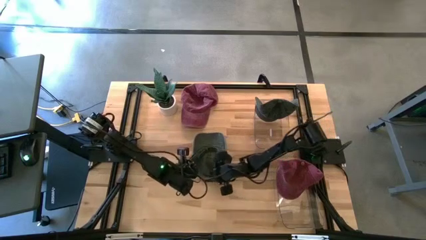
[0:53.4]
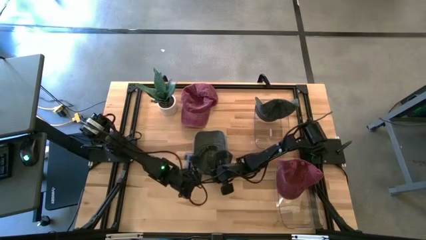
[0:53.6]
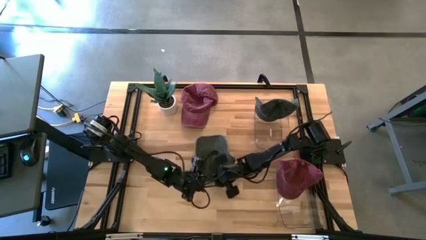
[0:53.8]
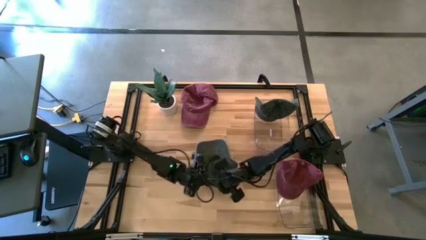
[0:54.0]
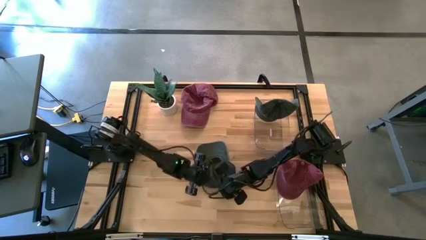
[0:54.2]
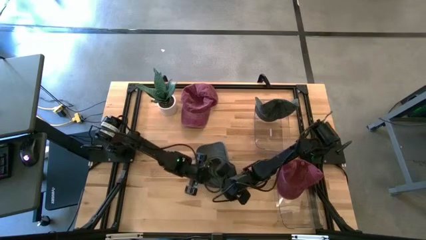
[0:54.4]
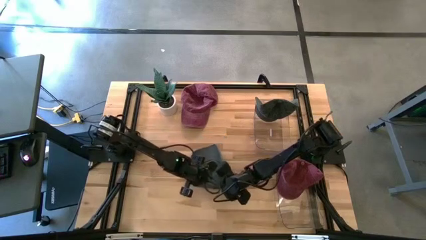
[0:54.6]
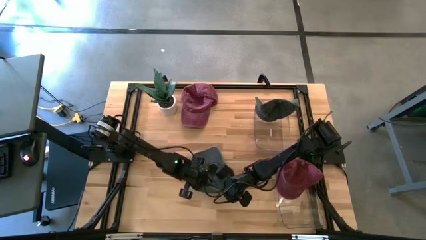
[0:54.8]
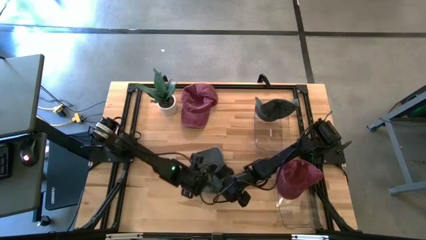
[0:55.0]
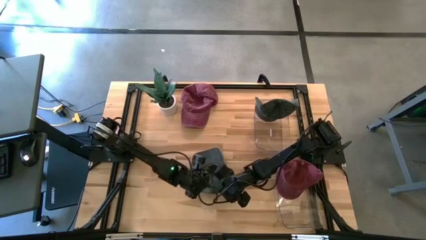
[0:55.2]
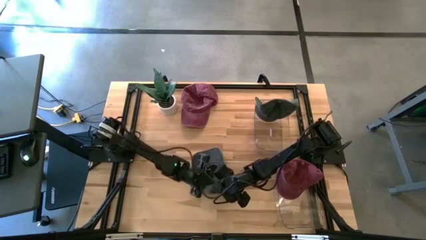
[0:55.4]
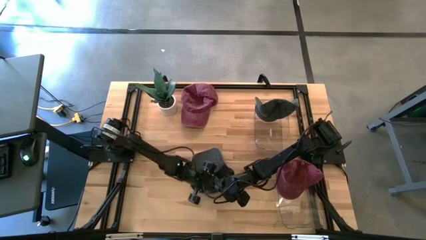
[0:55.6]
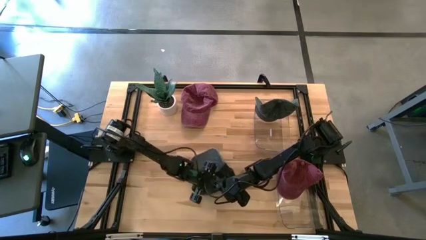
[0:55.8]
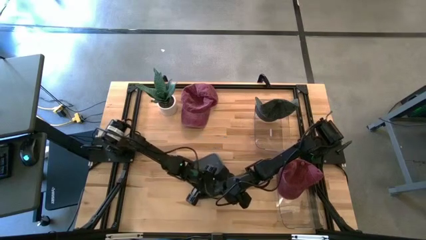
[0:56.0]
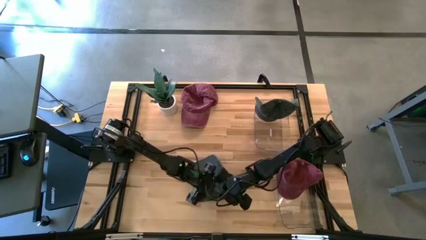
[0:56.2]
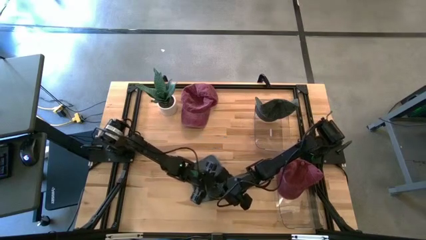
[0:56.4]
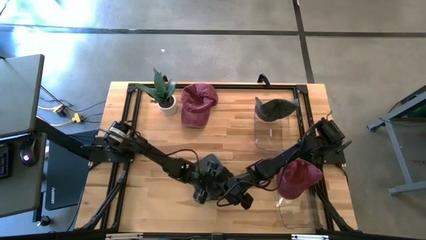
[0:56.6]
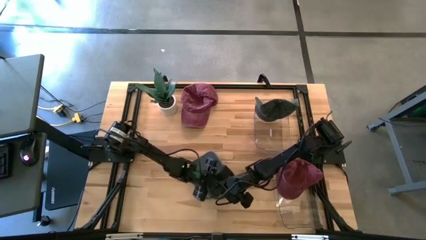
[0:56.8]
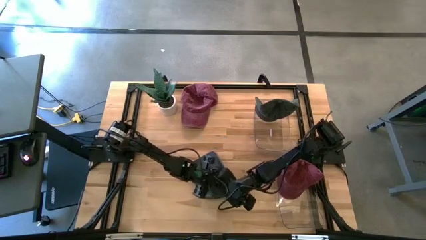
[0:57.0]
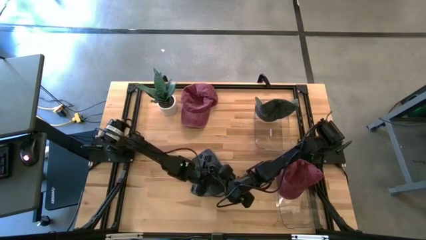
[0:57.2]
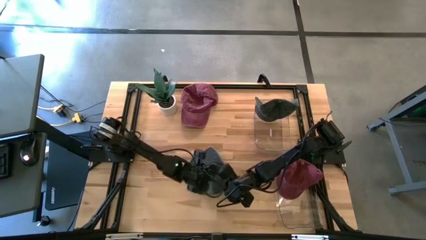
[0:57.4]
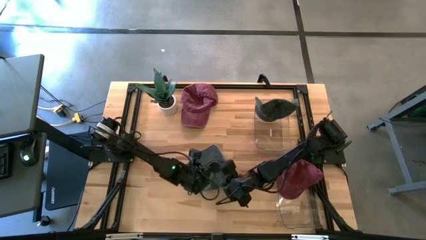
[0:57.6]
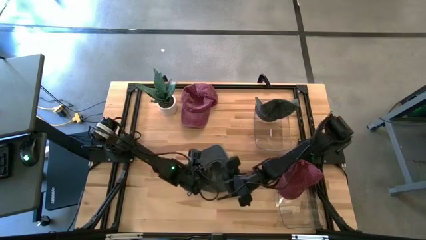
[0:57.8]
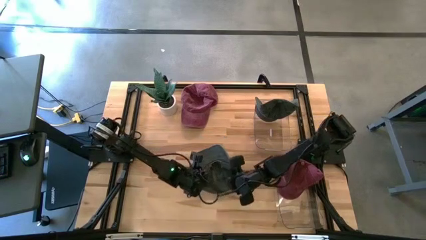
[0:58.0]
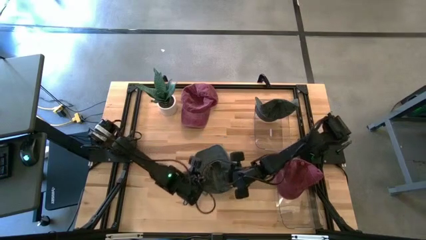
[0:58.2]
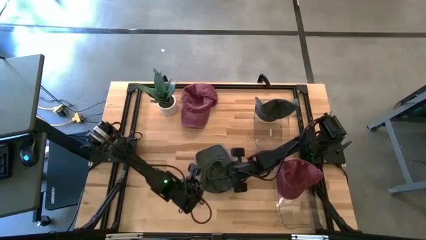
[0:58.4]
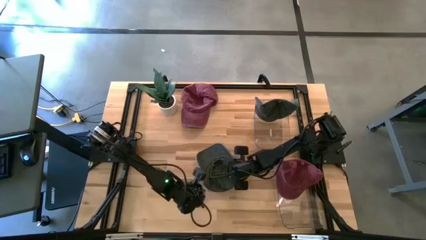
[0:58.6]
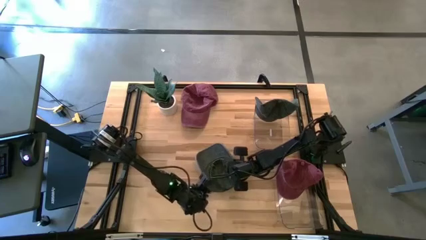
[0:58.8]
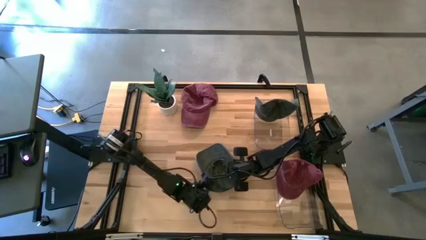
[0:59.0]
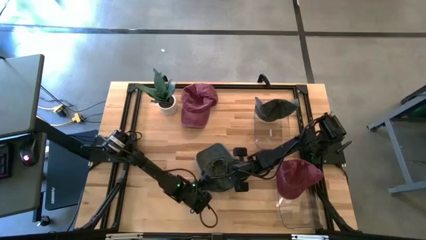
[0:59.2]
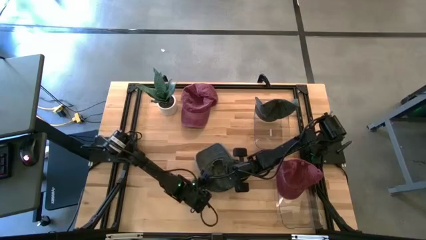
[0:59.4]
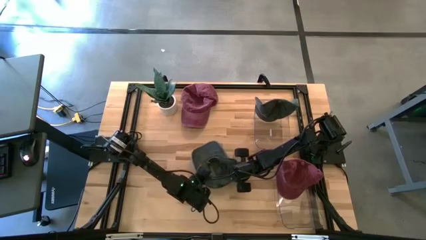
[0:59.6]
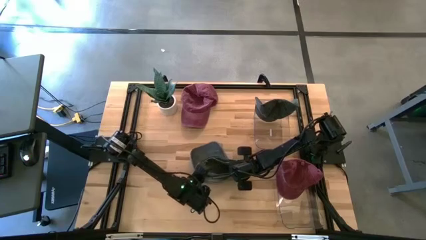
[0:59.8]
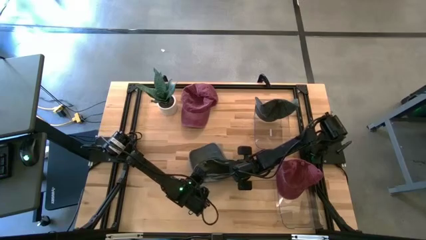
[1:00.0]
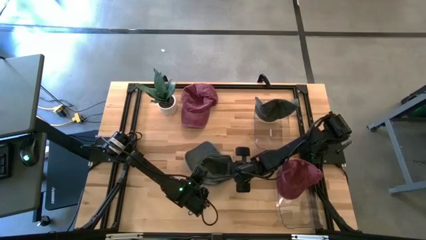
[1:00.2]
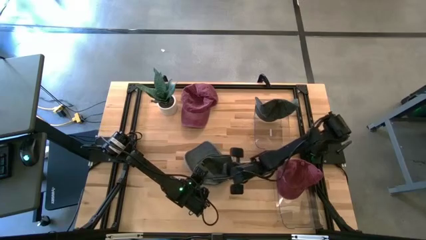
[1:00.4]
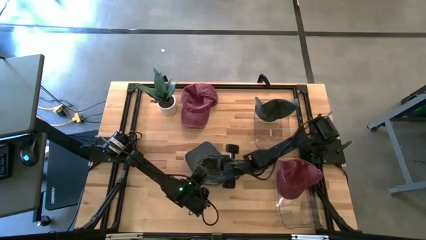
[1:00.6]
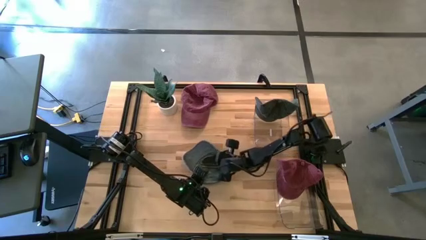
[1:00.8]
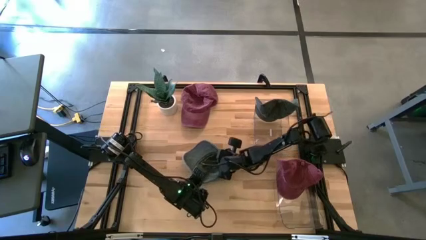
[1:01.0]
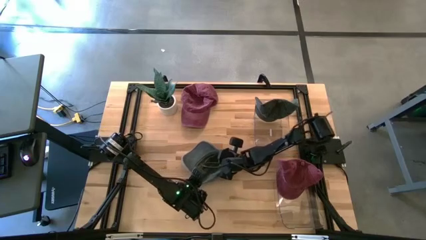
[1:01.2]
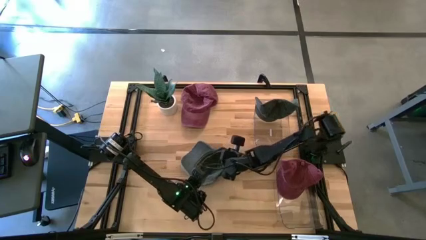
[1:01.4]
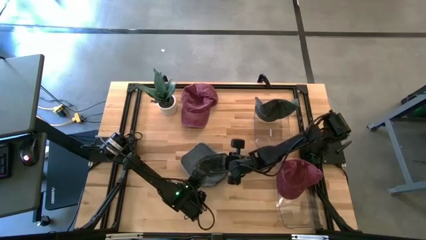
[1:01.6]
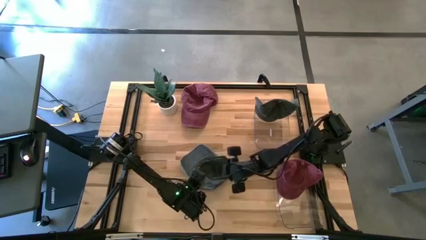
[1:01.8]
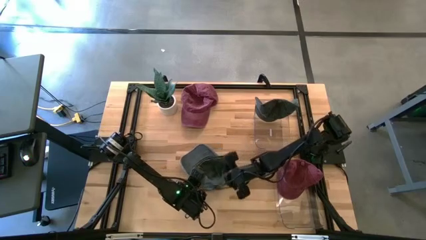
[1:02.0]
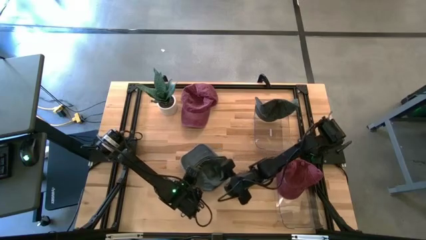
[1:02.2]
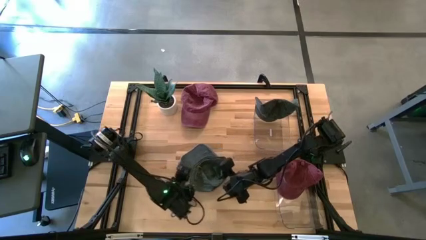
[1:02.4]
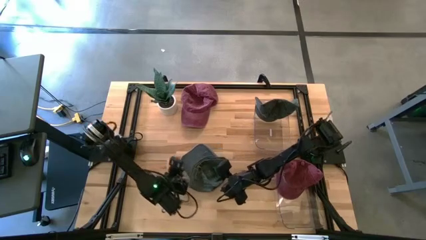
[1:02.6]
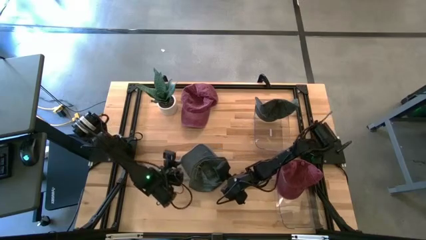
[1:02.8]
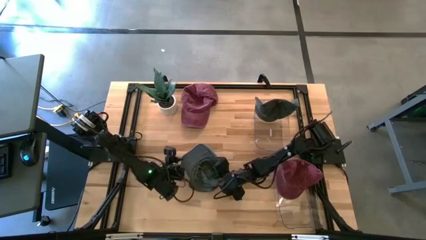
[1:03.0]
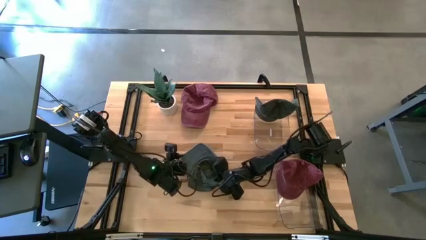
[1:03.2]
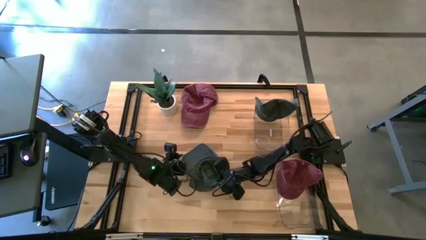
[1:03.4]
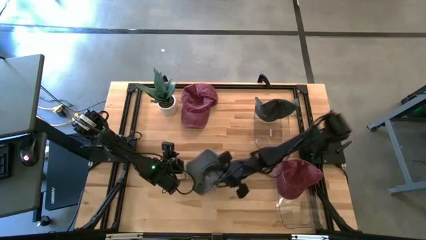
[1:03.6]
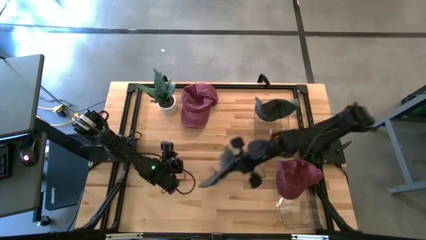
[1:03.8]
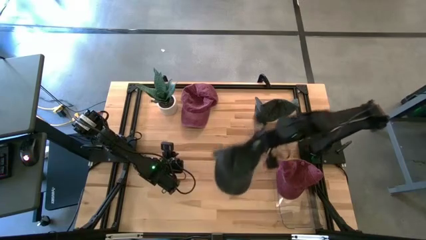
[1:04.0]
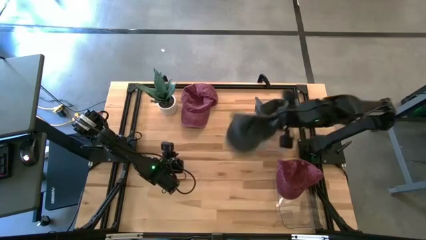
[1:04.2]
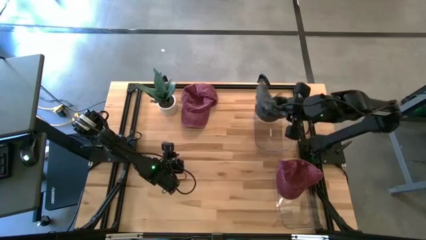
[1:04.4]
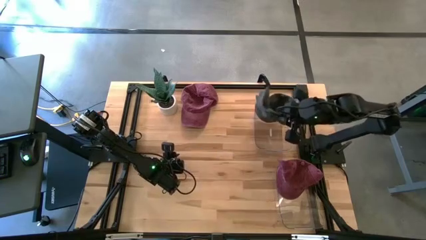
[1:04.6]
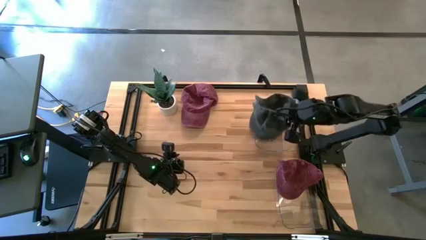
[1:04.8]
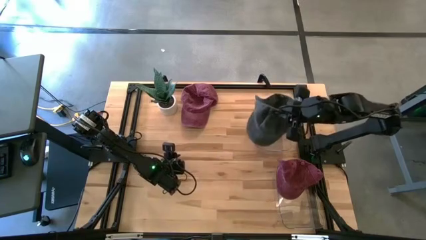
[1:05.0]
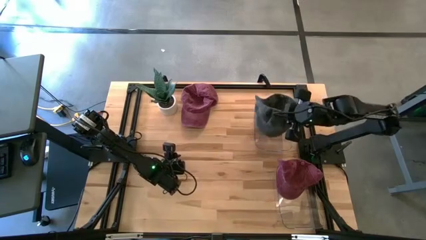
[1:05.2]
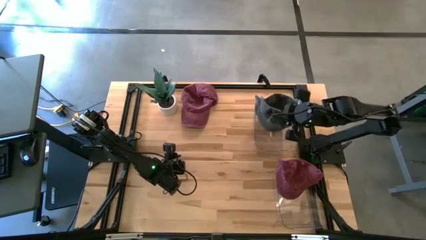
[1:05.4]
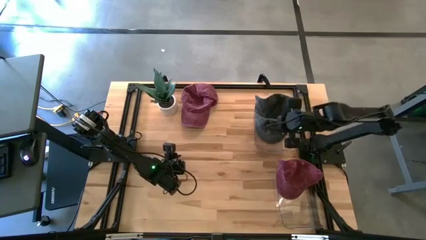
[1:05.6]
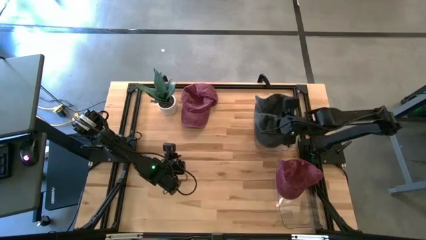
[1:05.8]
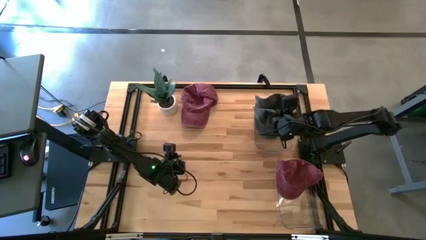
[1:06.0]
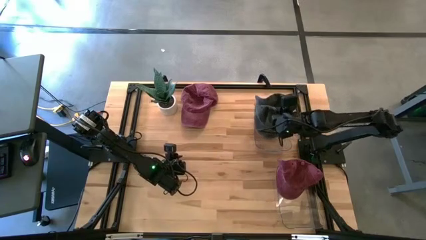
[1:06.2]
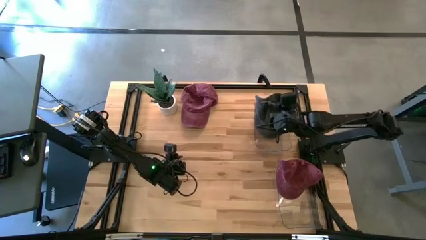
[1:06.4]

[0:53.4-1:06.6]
Task: Pick & Place hat
Put the black cap into the top transparent bin
